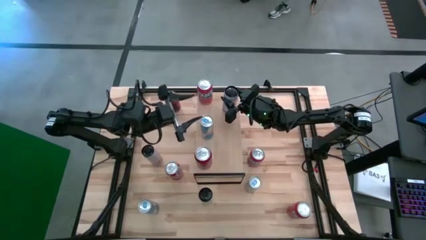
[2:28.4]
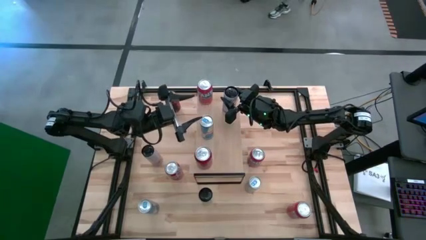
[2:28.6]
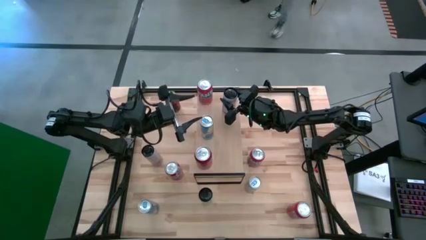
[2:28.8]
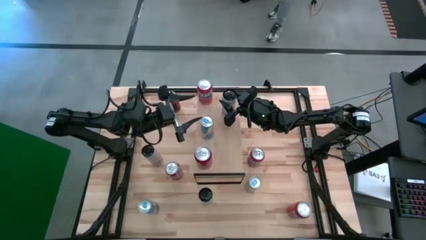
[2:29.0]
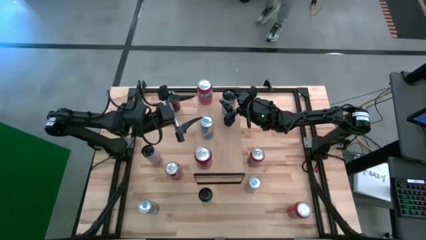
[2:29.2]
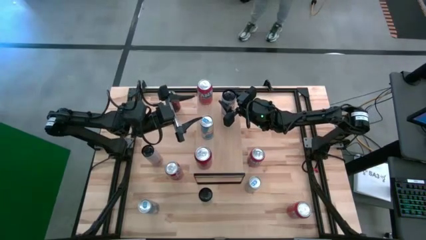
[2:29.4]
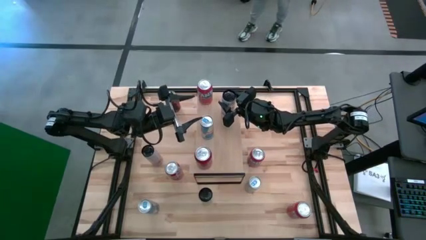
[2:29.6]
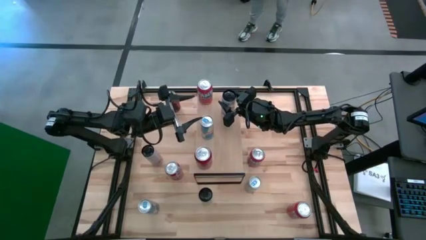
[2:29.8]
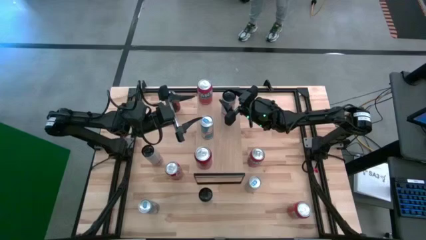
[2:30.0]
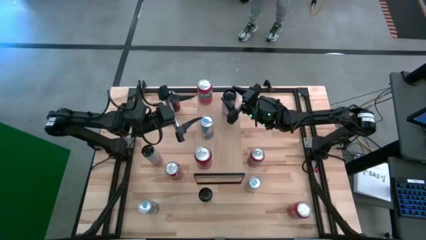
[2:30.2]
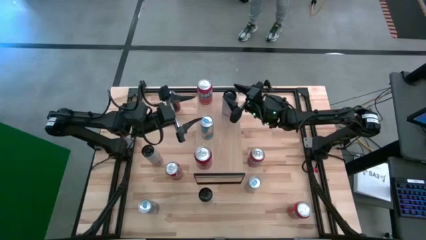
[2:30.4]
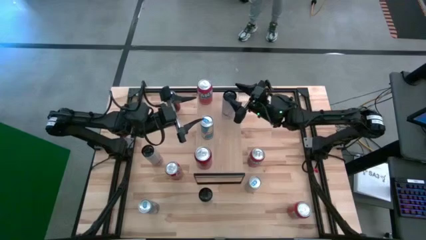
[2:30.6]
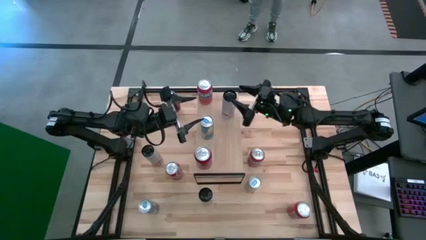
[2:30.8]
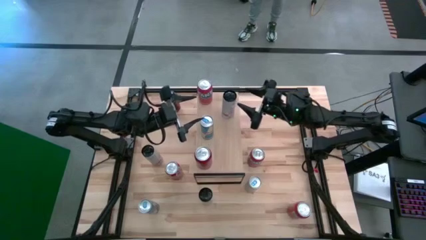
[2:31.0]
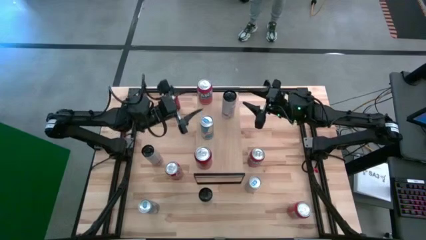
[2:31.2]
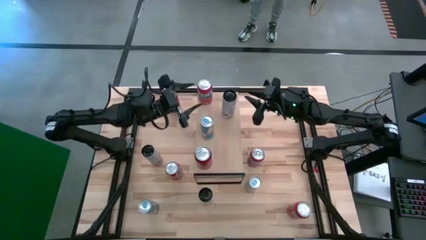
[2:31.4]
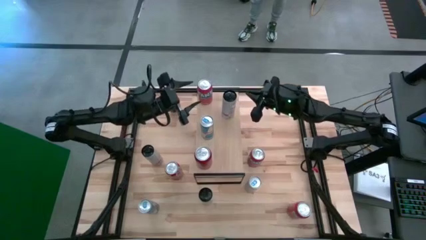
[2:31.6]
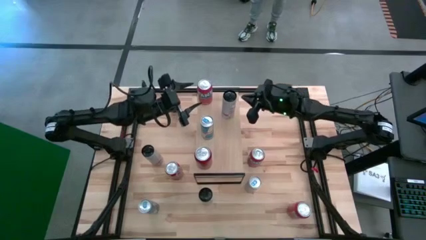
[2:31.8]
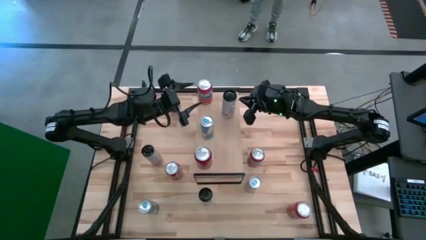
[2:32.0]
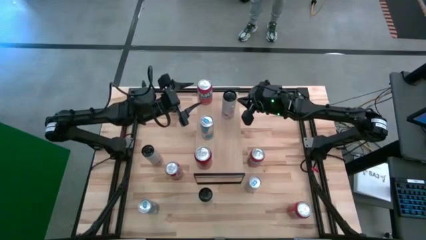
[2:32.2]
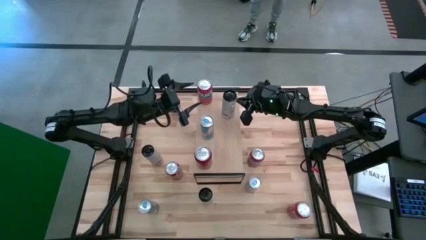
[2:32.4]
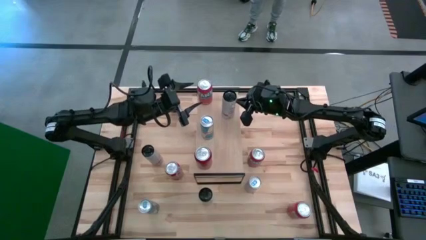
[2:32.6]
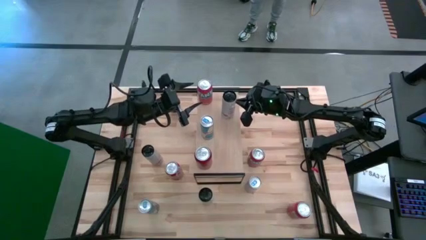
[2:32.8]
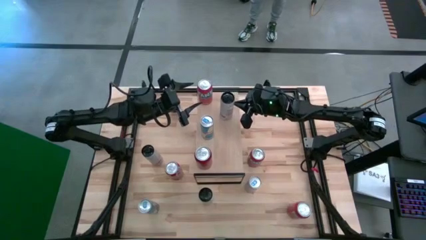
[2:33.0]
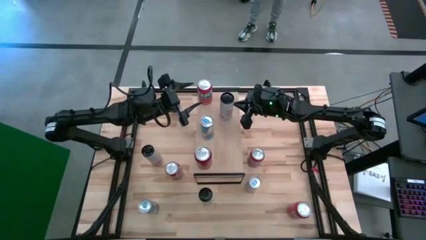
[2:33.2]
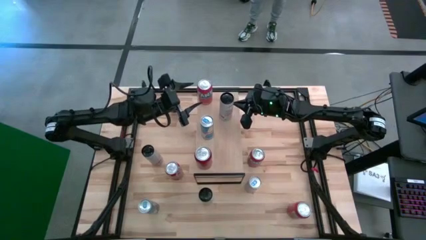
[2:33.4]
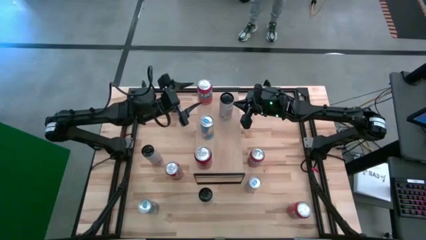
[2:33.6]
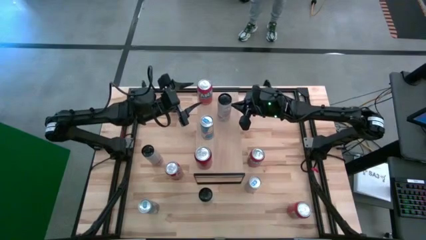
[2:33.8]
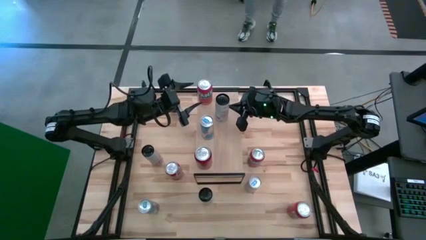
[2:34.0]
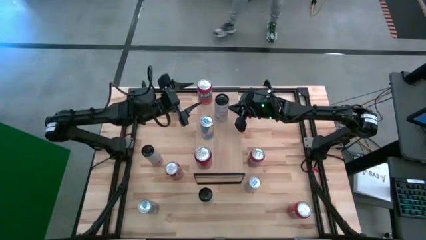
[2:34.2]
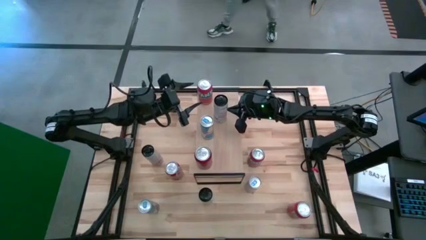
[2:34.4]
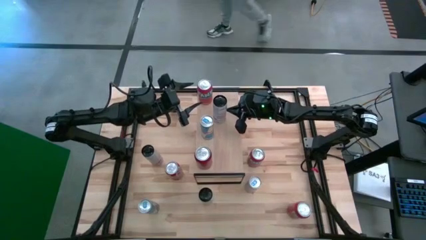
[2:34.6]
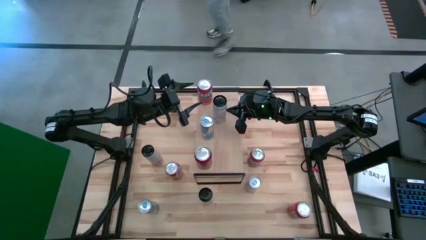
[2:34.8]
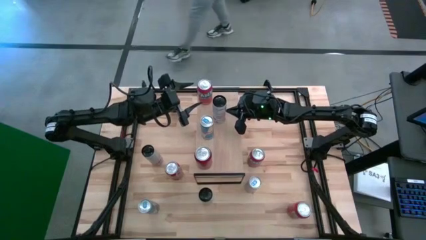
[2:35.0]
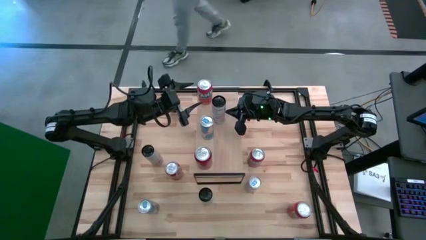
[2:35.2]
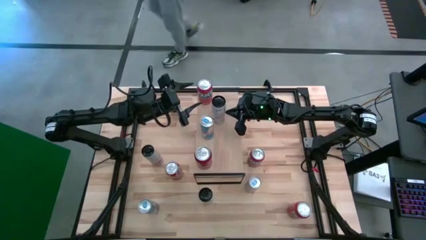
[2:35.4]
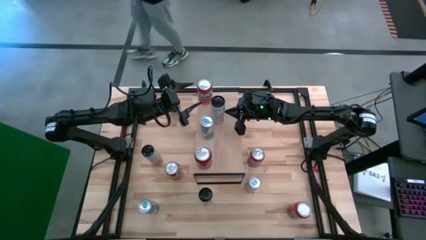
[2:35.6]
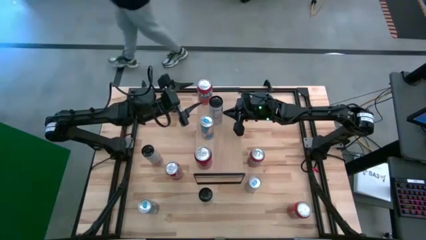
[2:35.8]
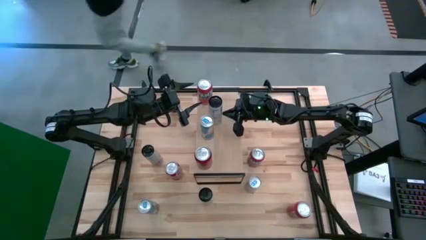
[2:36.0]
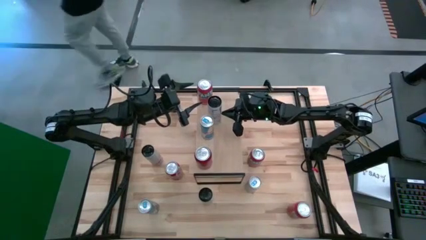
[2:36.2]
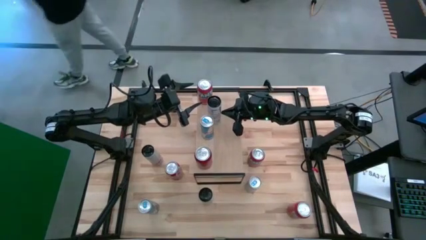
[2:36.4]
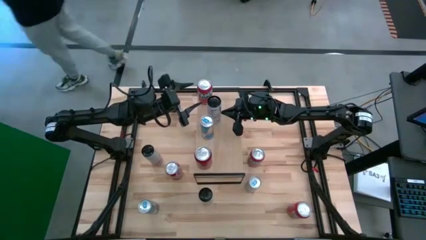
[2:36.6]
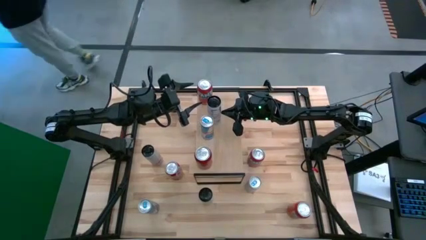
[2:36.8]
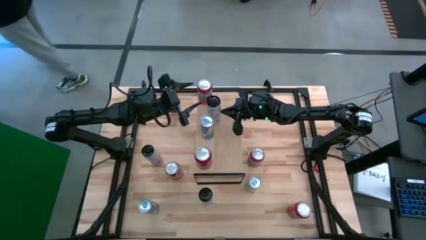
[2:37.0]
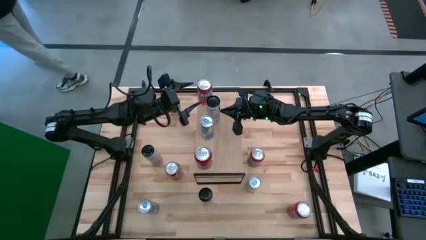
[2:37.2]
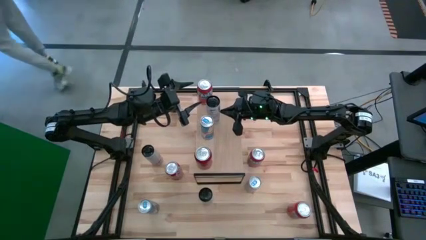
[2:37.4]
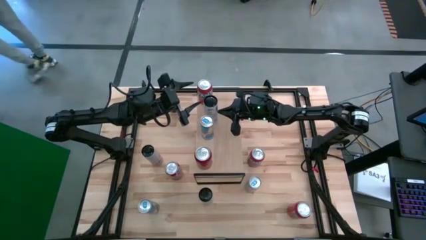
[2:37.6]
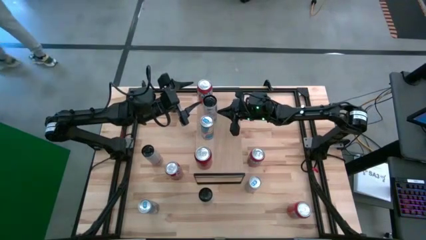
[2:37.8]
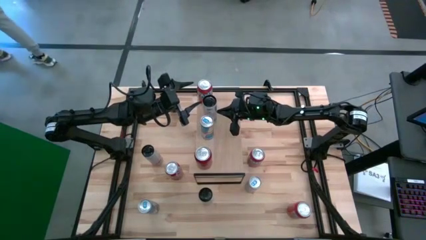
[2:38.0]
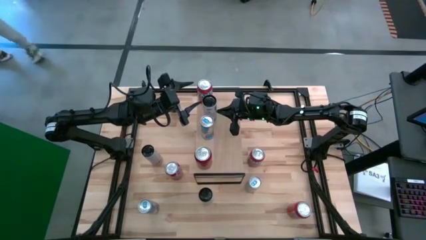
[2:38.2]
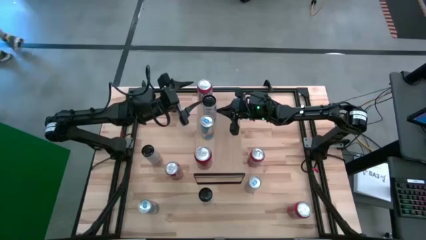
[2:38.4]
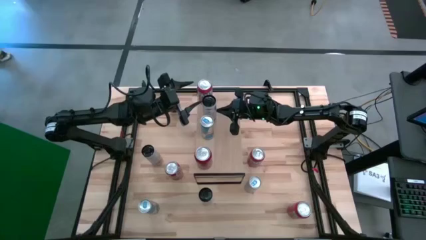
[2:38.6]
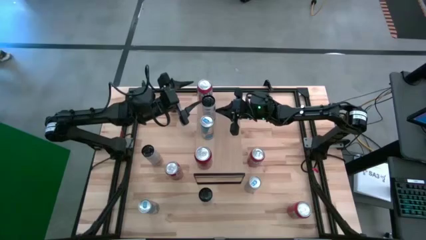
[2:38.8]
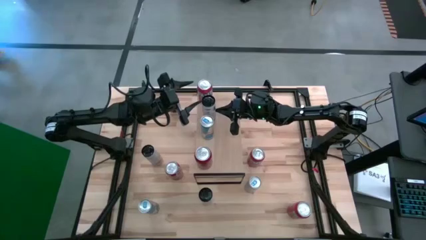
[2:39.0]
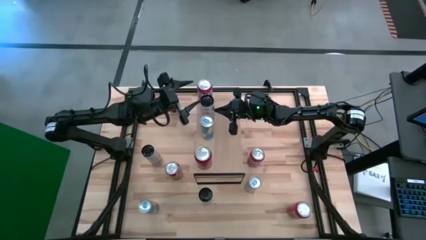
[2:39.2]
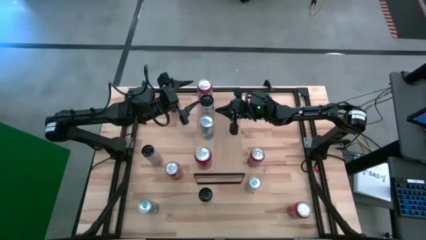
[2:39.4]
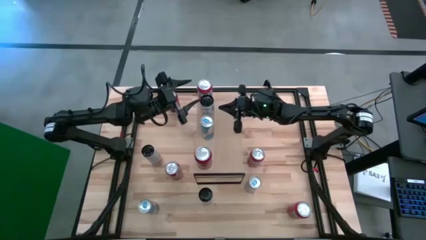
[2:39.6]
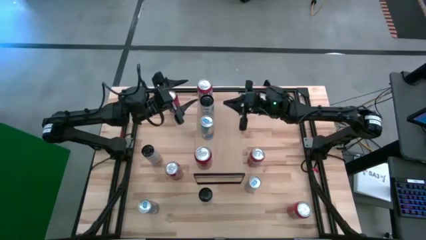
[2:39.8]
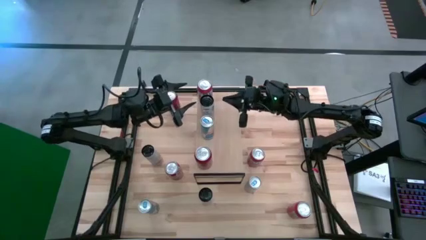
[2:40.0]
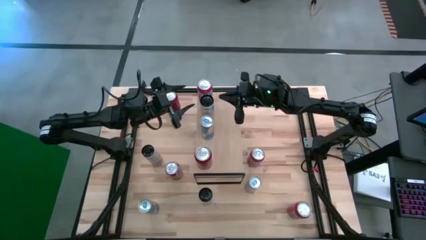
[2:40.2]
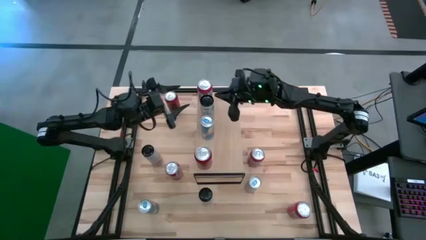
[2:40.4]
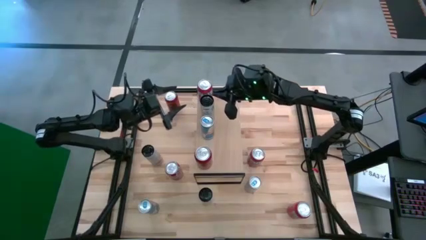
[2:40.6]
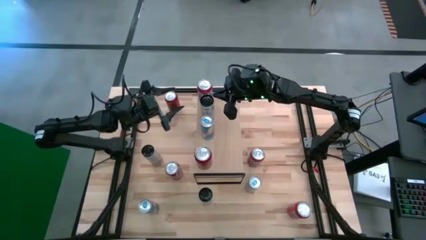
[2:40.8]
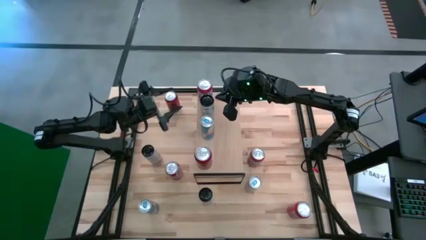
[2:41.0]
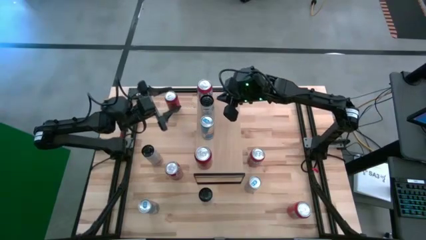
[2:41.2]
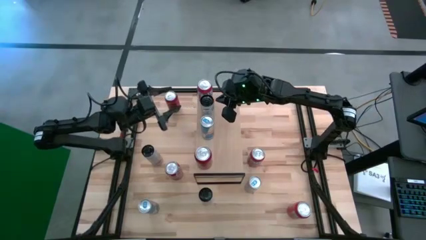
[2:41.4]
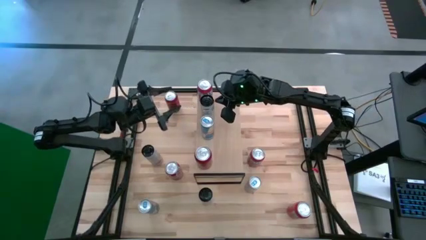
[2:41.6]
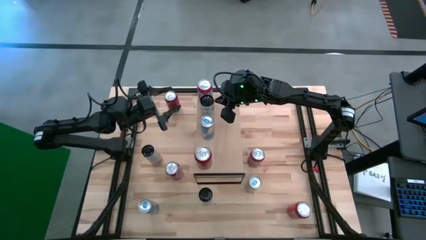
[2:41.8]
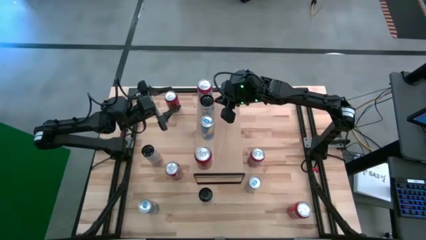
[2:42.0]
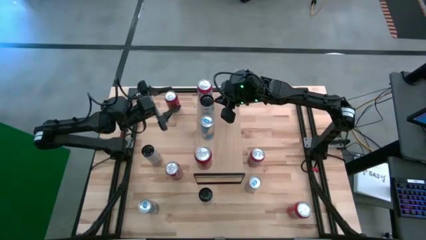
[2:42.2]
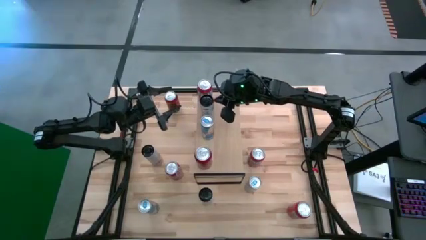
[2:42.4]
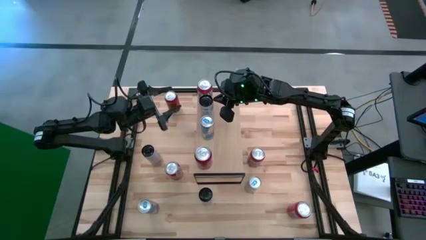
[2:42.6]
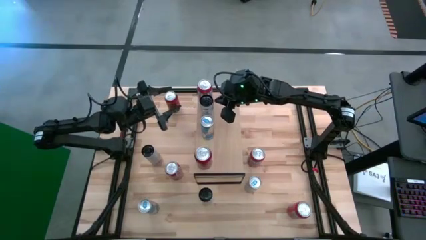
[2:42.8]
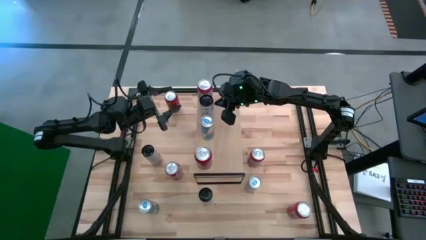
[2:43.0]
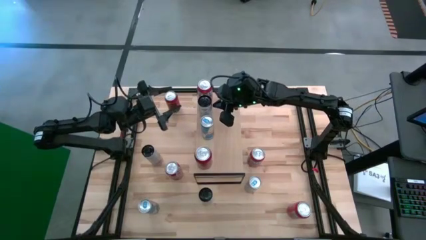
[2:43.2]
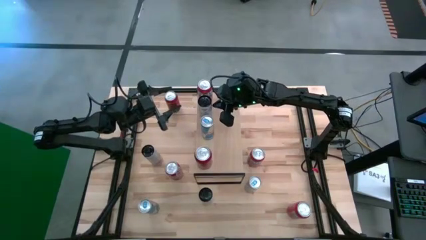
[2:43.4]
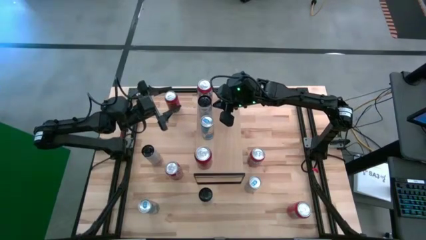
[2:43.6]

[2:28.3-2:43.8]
Task: Place canned beverage on shelf
Put the white and pink soda can on the top right shelf

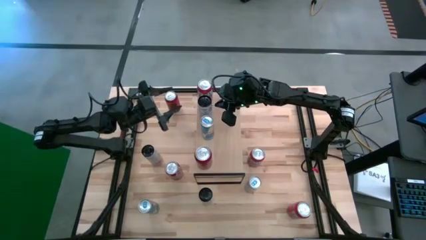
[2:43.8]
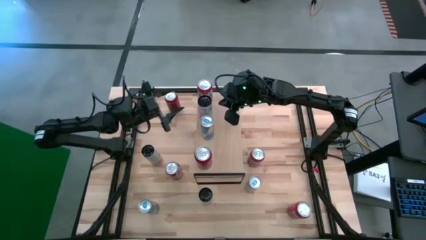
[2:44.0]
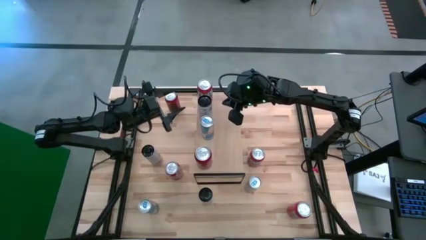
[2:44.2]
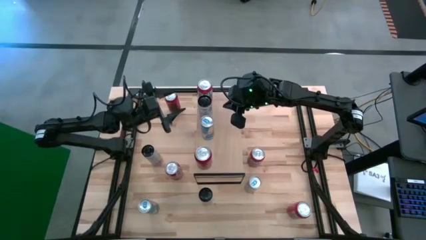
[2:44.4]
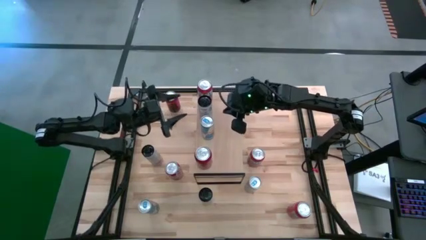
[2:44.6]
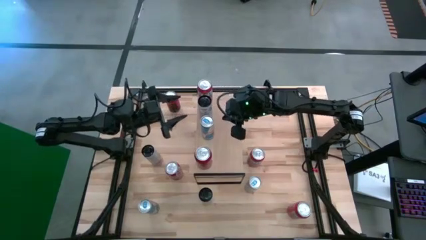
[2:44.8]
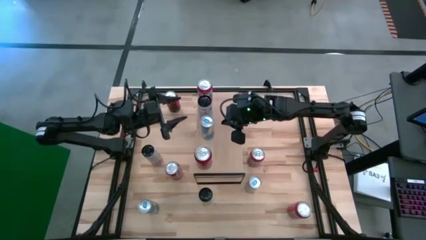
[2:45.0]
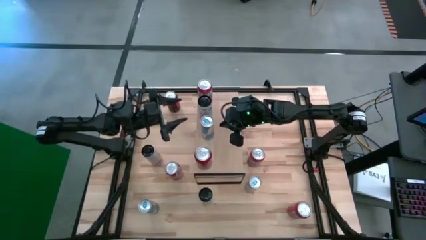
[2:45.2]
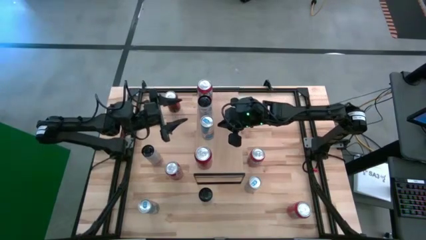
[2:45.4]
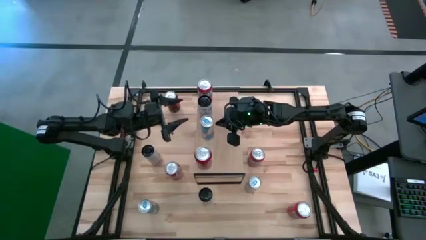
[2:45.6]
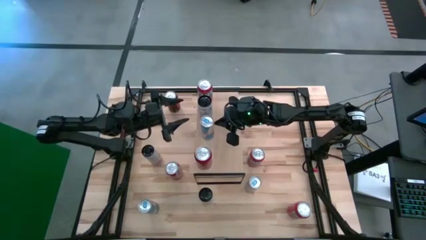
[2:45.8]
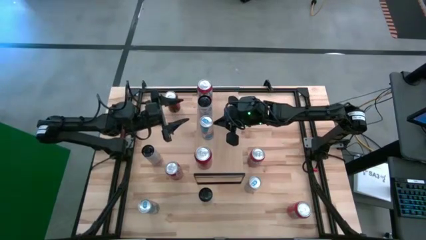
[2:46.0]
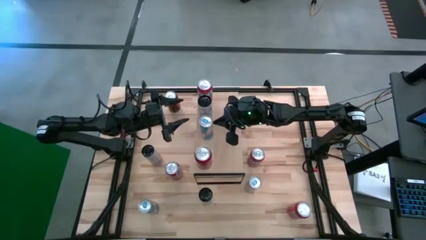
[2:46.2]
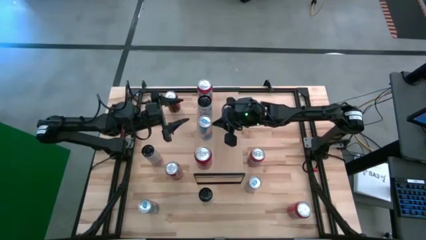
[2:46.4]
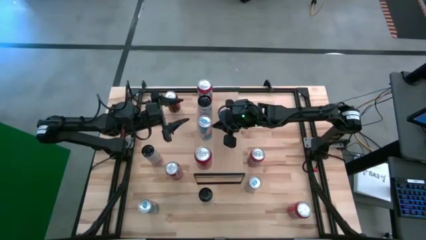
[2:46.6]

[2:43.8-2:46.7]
Adjust the blue soda on the shelf
